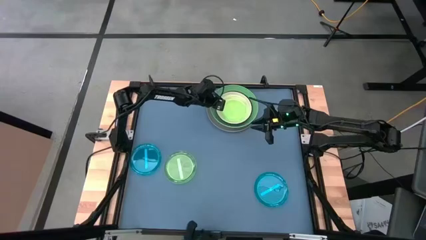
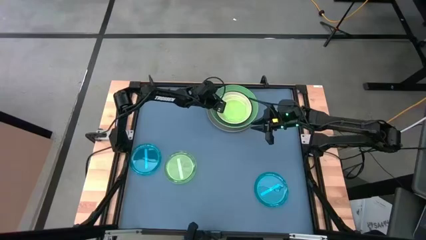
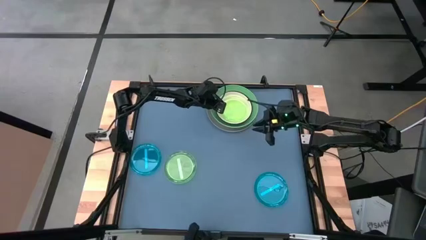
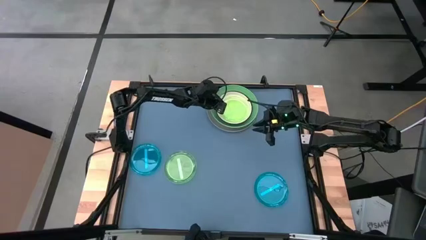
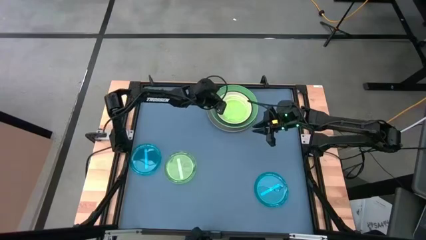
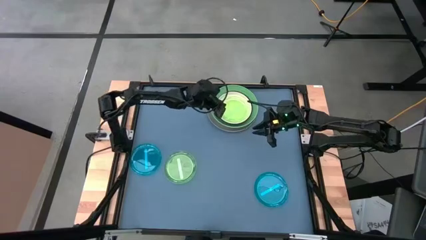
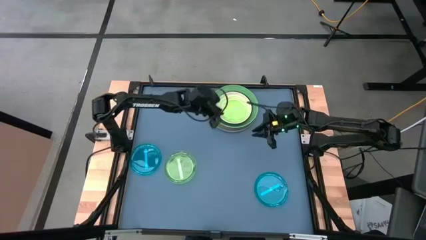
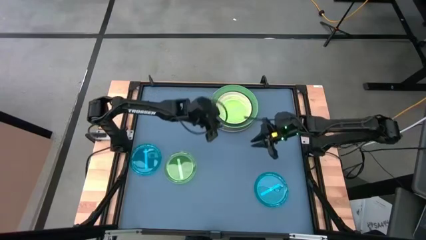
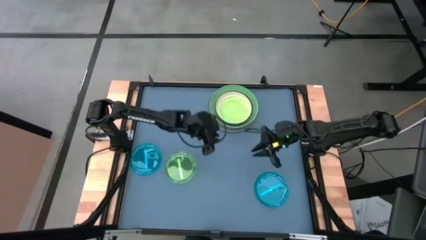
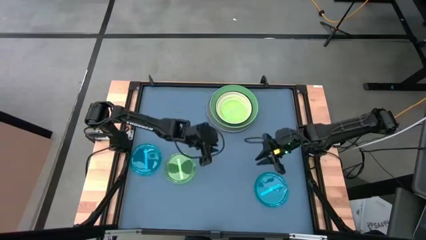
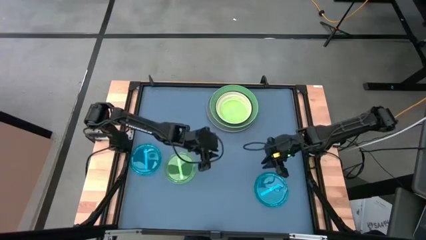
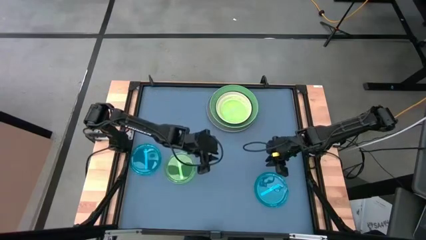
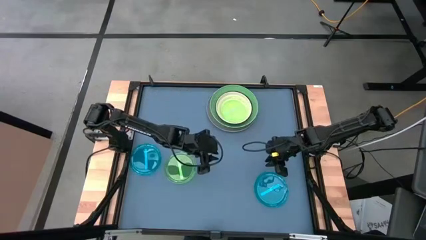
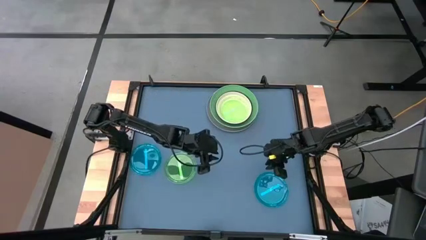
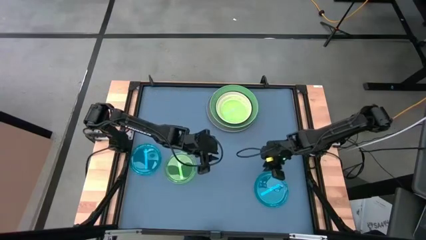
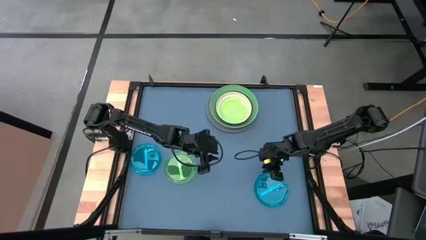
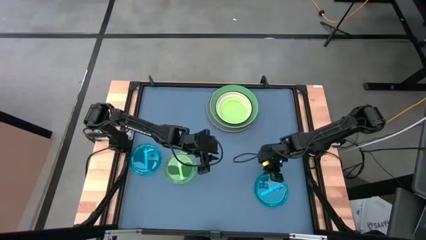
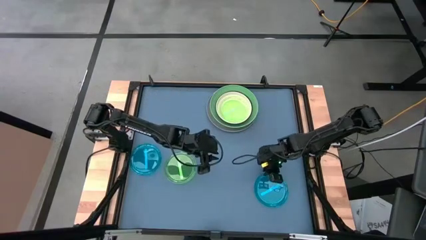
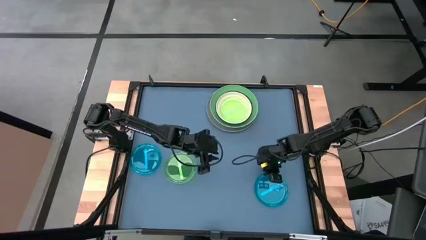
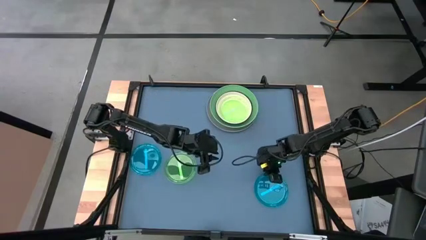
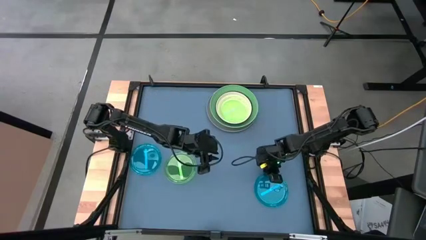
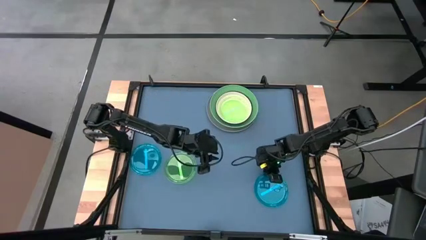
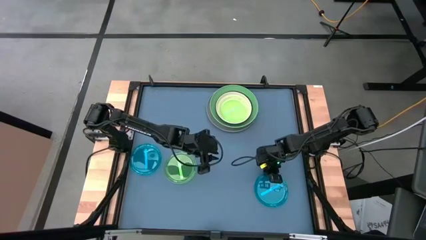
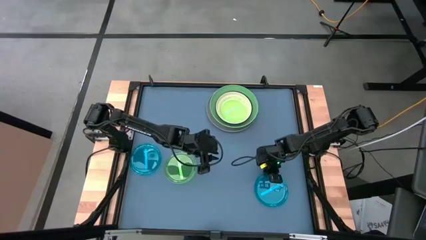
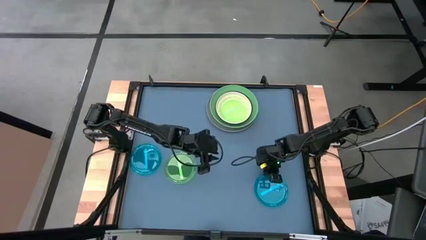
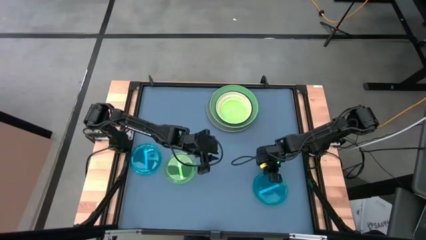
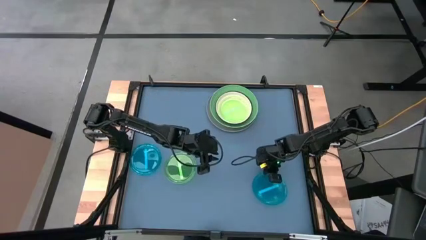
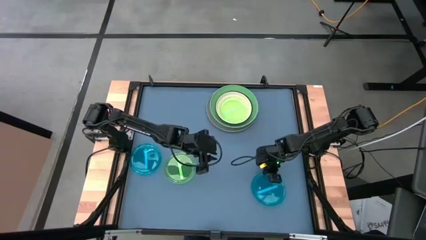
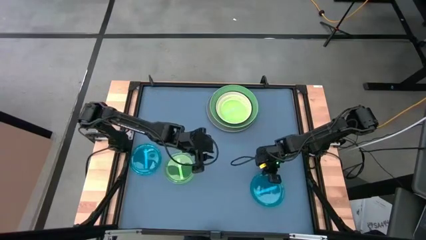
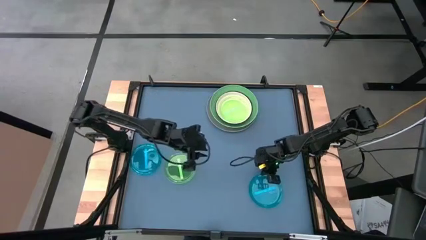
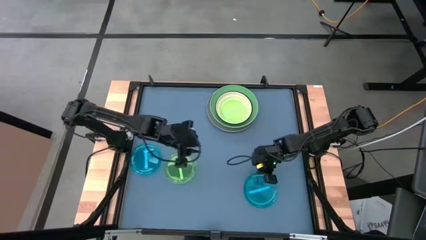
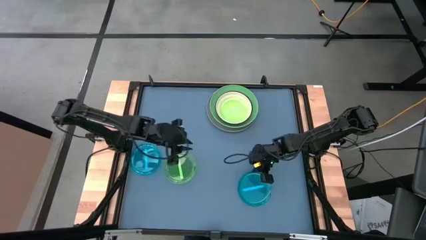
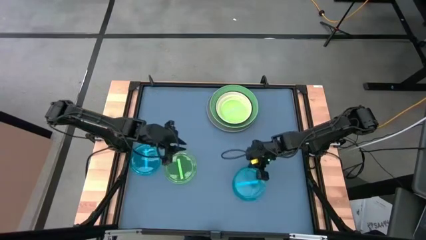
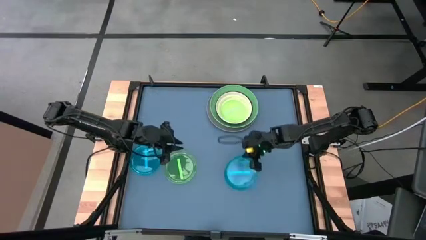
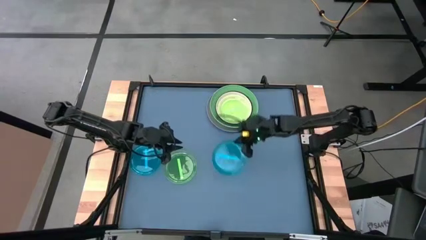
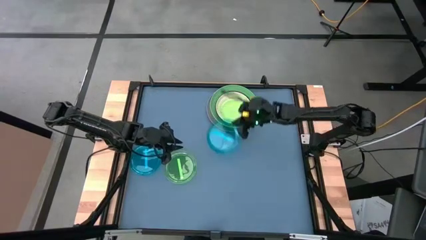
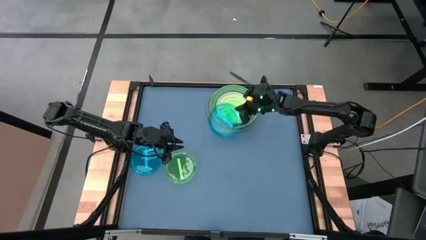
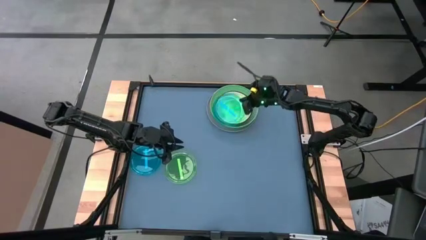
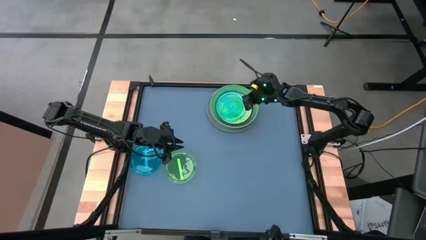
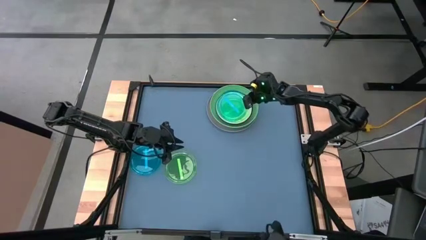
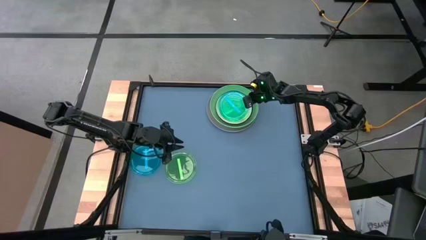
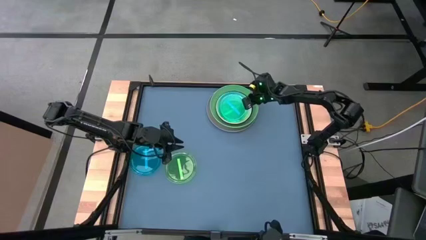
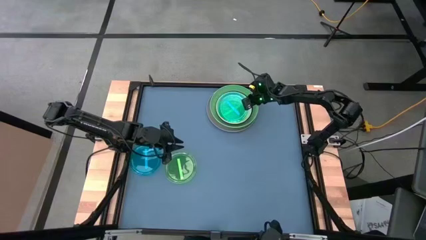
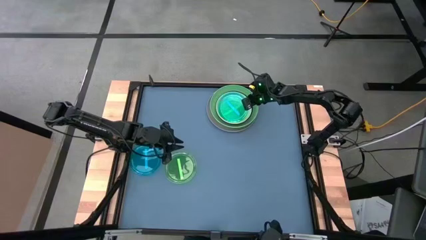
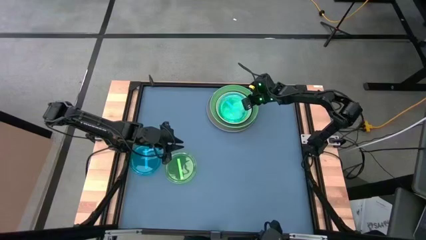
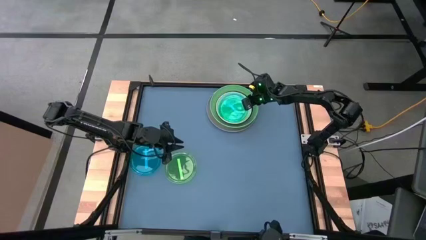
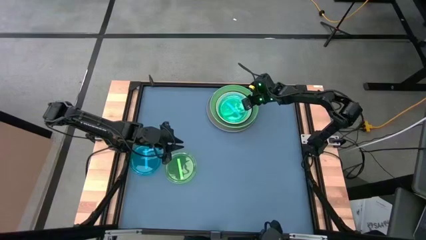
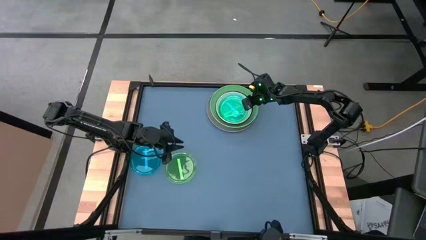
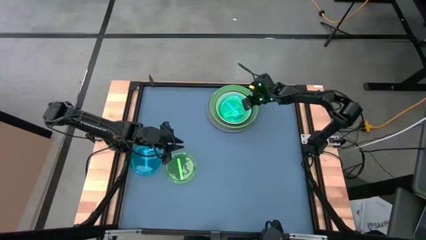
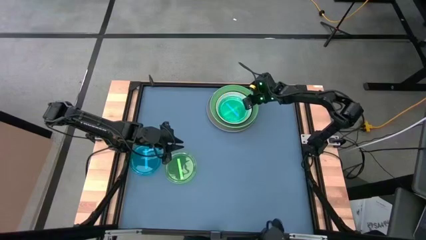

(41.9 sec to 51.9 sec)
Task: Stack plastic plates
Stack the small blue plate on the small green plate

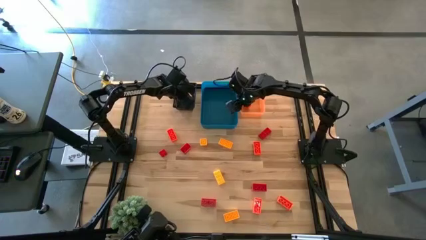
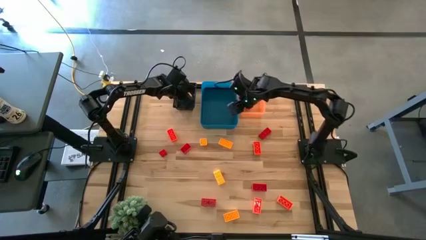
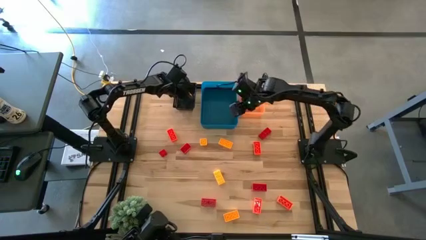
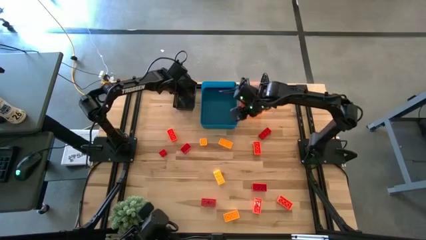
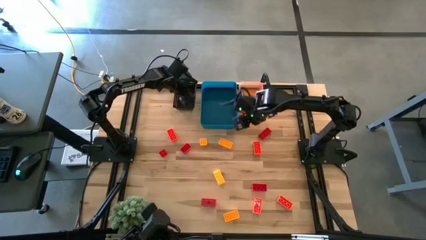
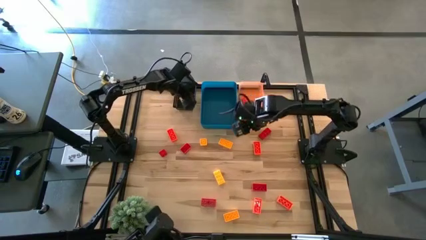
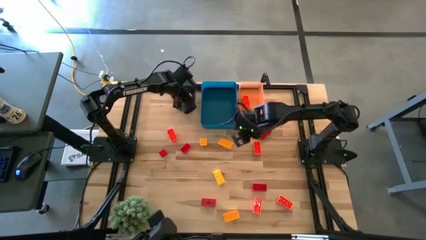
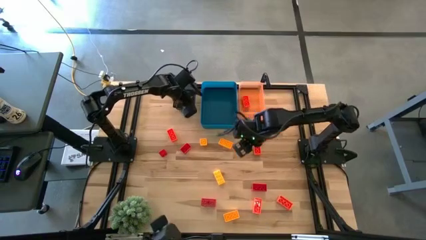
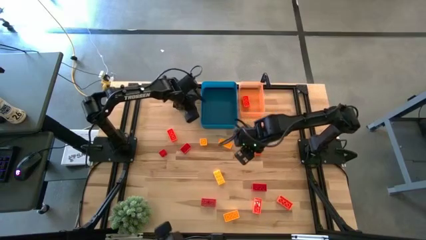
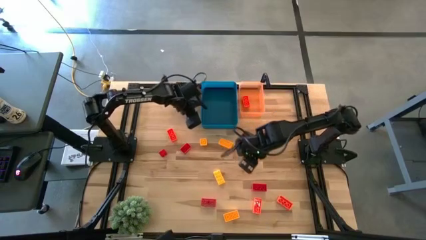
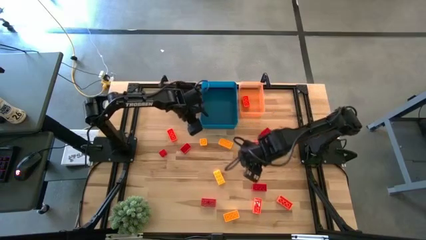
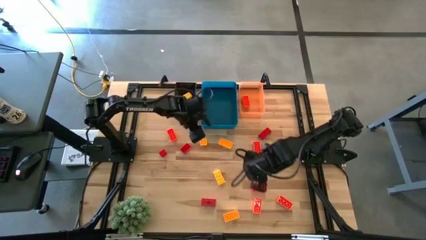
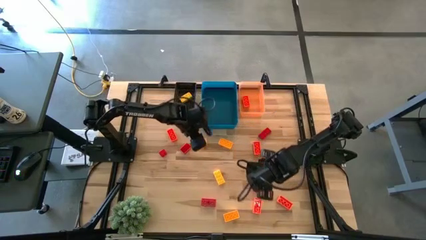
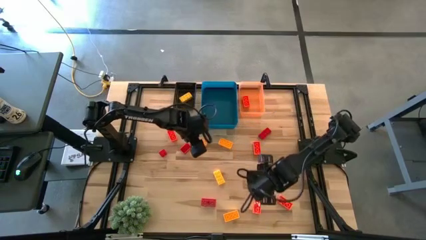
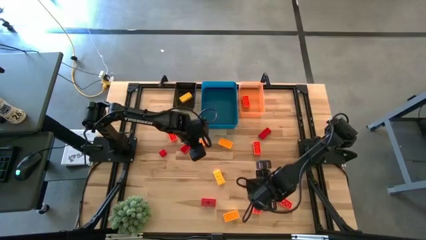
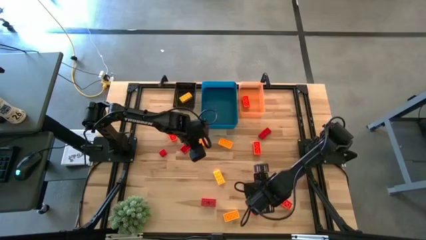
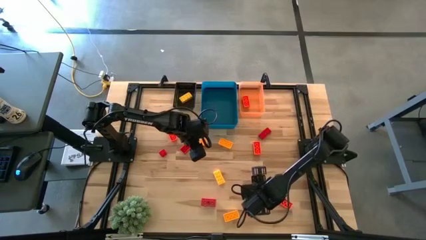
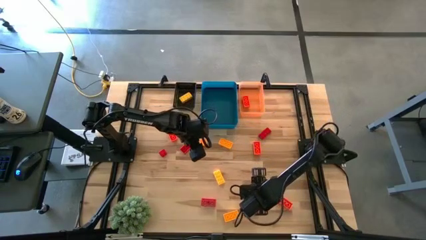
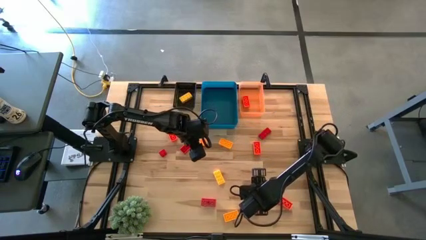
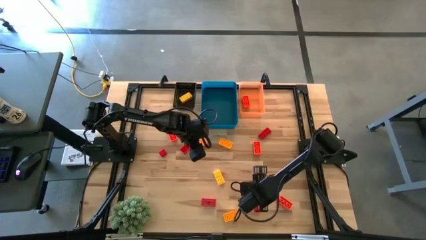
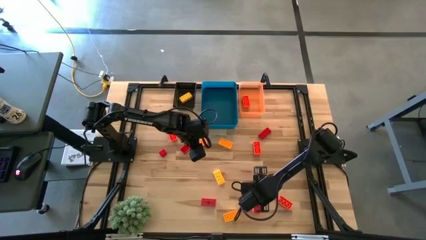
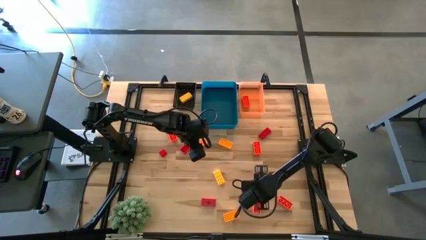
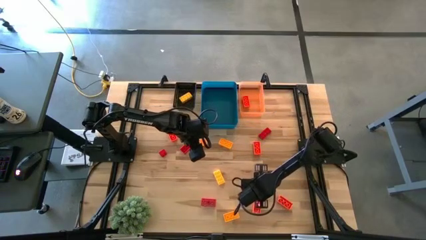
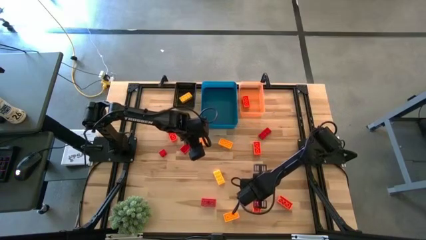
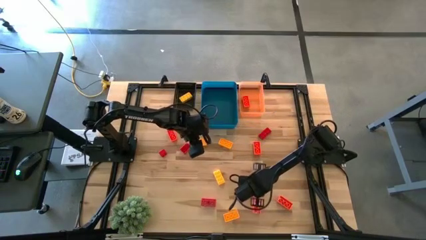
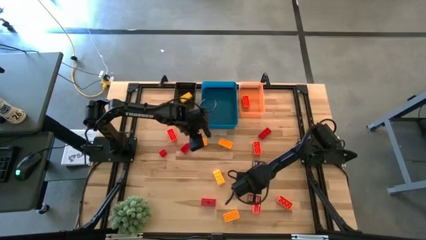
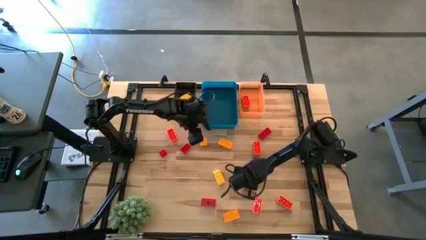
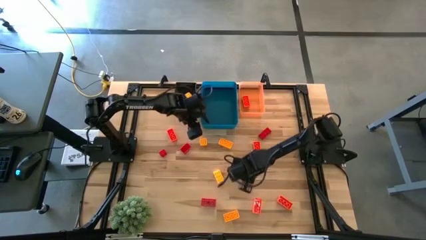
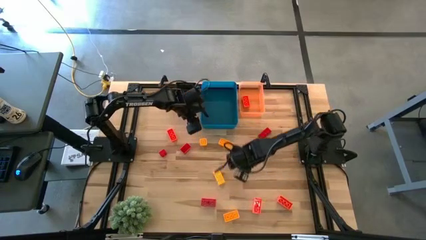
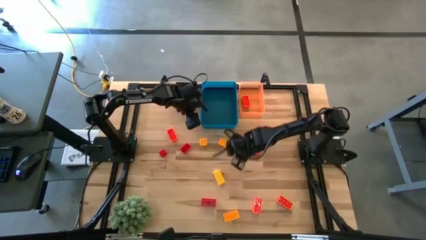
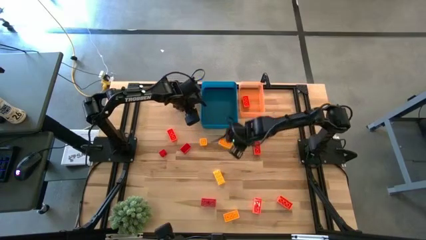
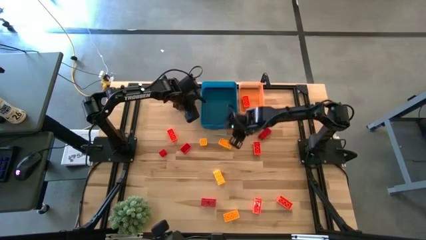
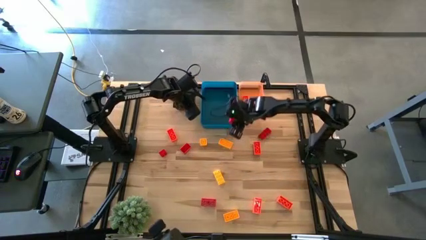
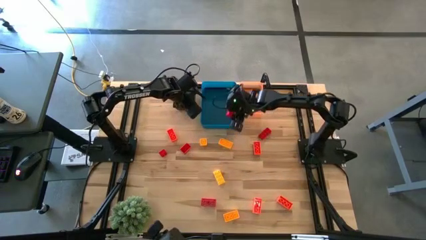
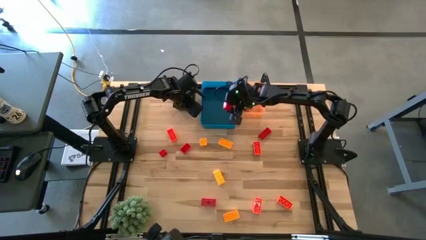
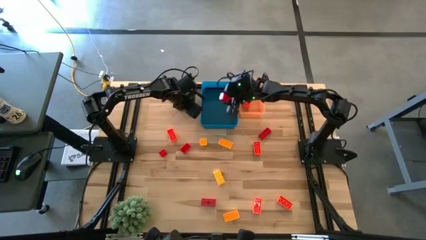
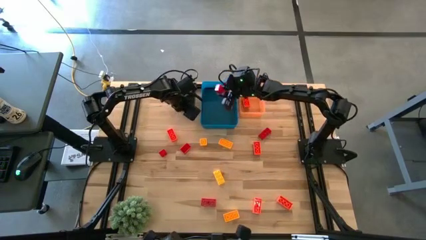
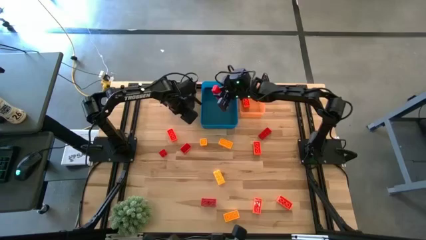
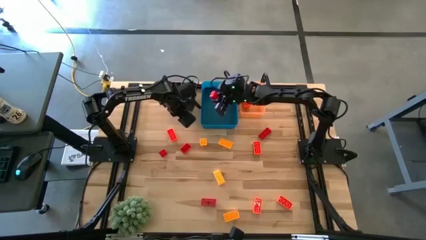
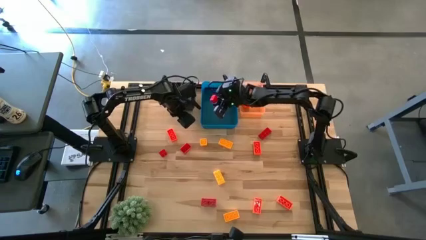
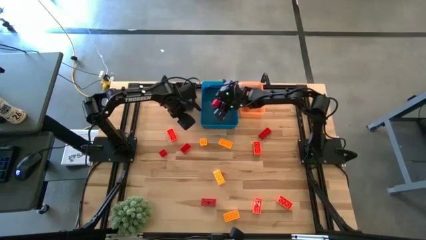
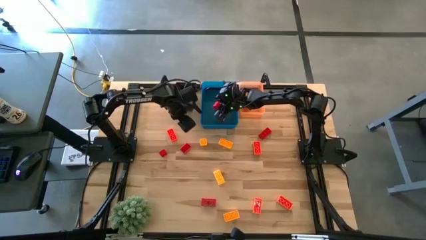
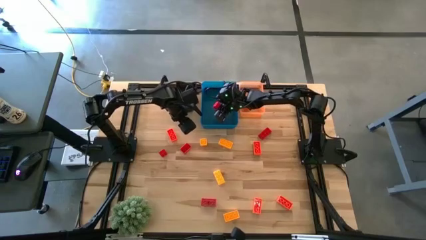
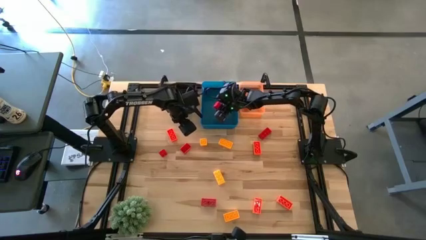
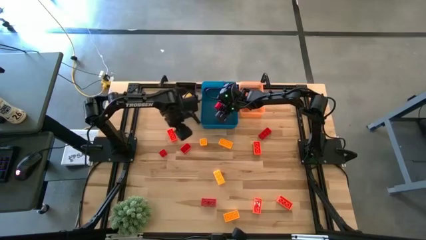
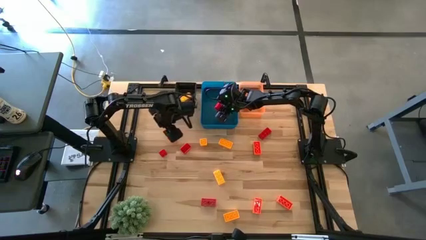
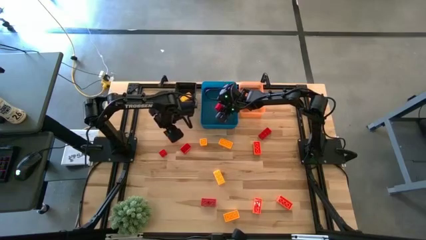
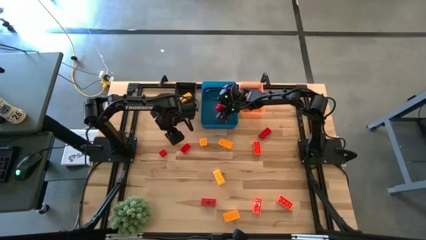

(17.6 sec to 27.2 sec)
Task: Sort & place blocks by color
Put the red game piece into the blue bin
